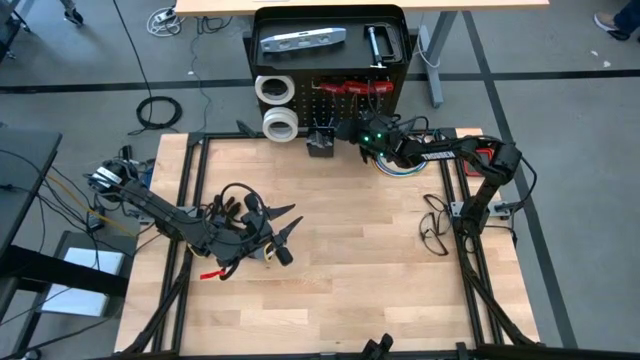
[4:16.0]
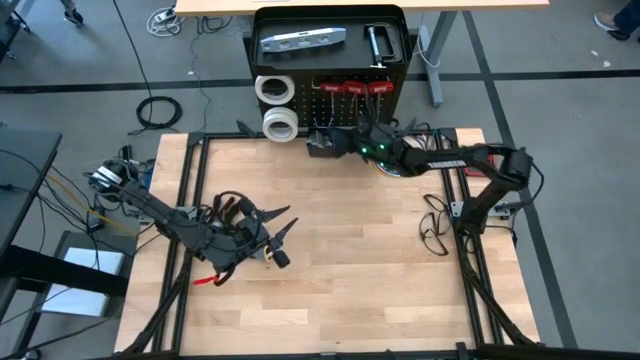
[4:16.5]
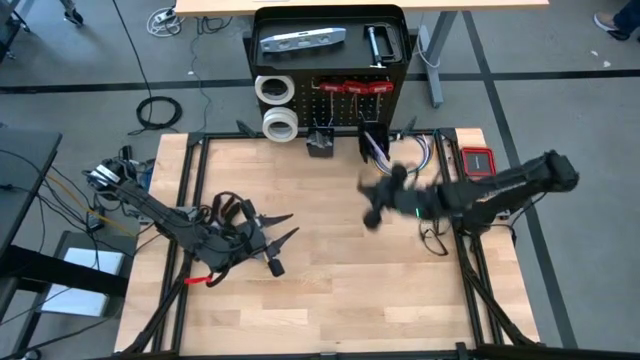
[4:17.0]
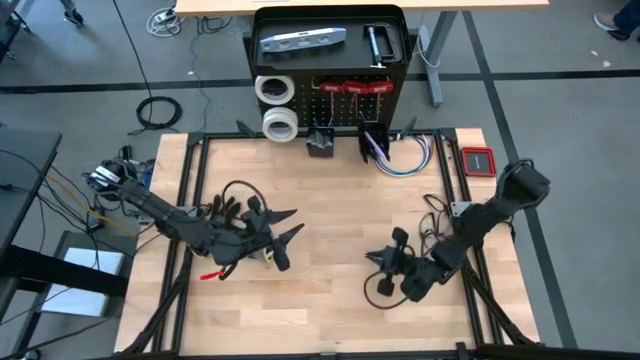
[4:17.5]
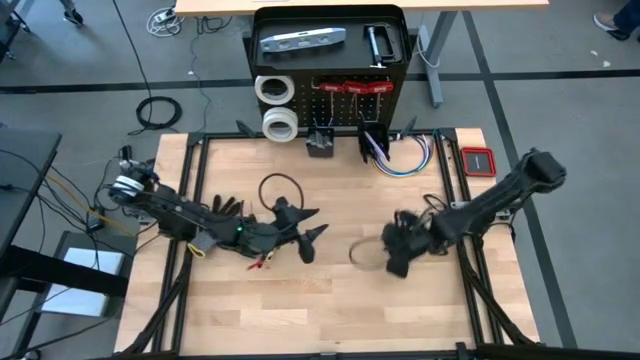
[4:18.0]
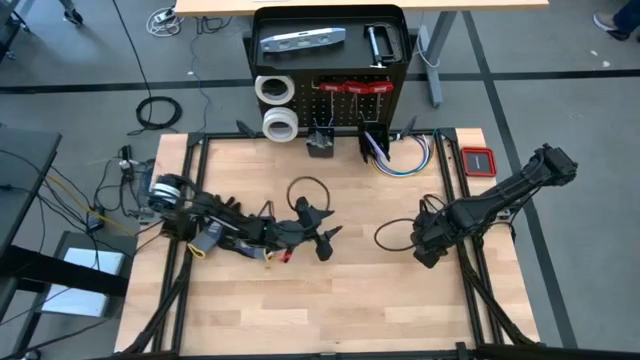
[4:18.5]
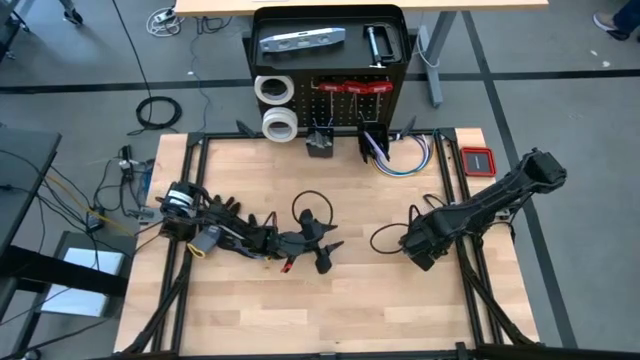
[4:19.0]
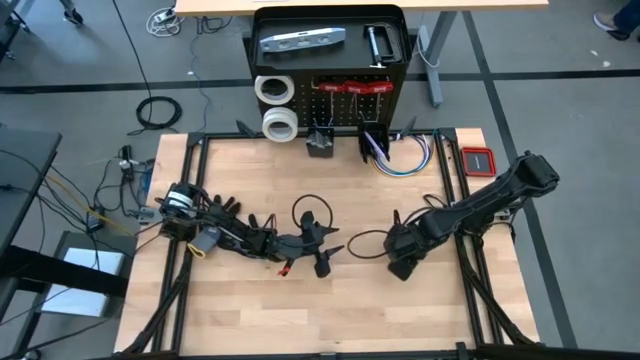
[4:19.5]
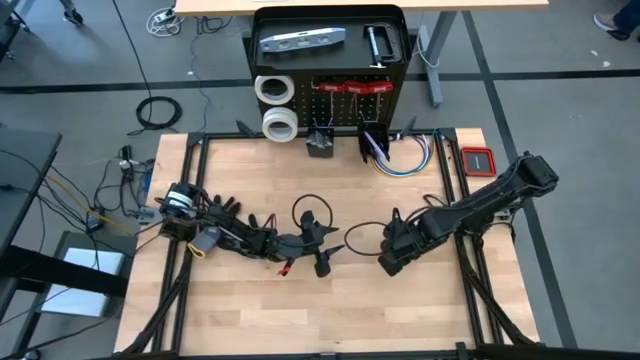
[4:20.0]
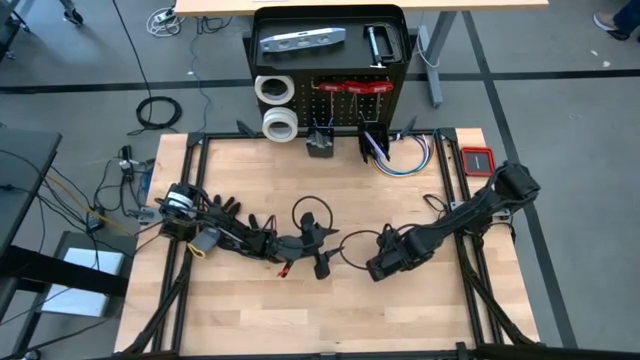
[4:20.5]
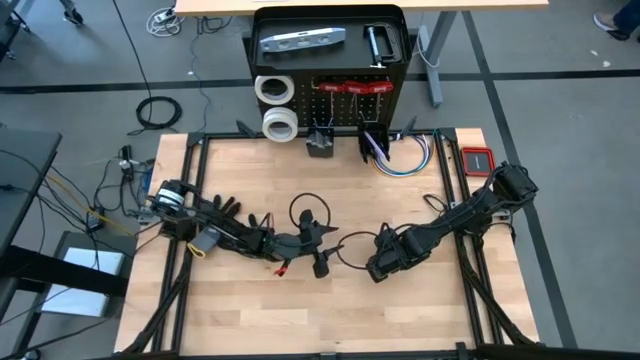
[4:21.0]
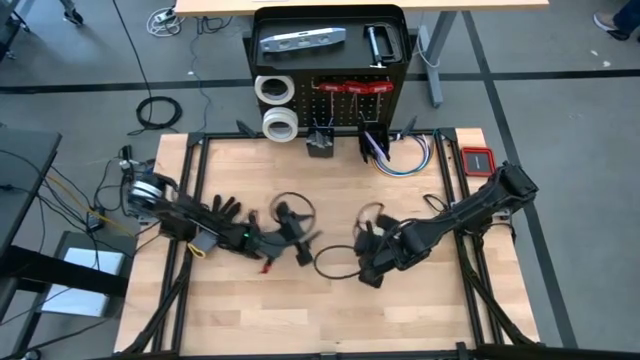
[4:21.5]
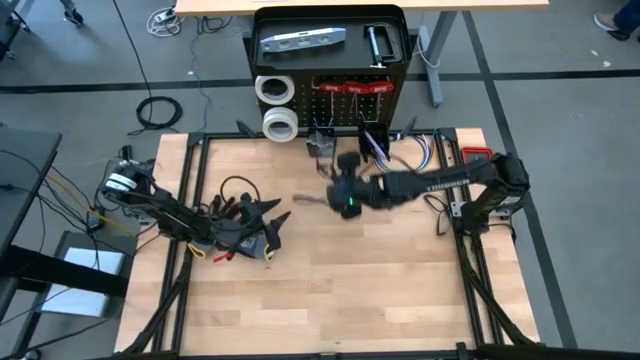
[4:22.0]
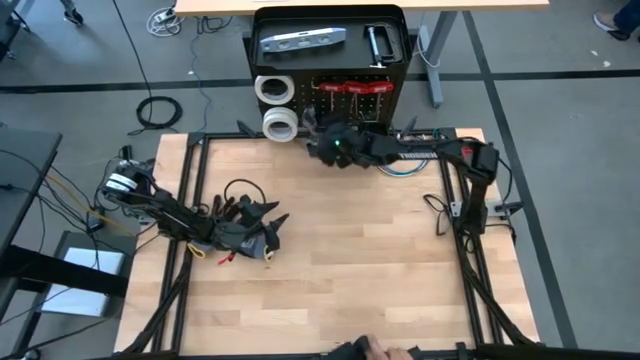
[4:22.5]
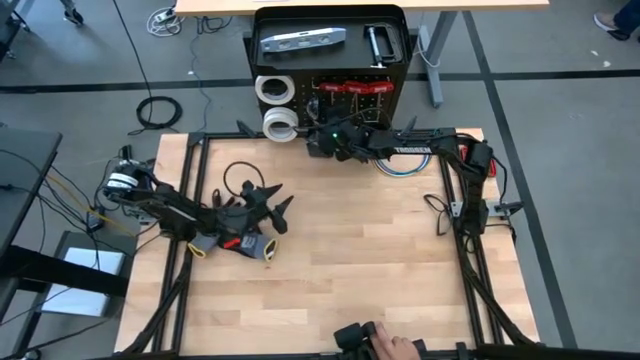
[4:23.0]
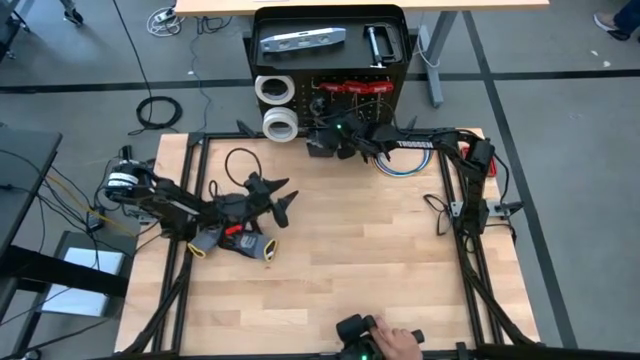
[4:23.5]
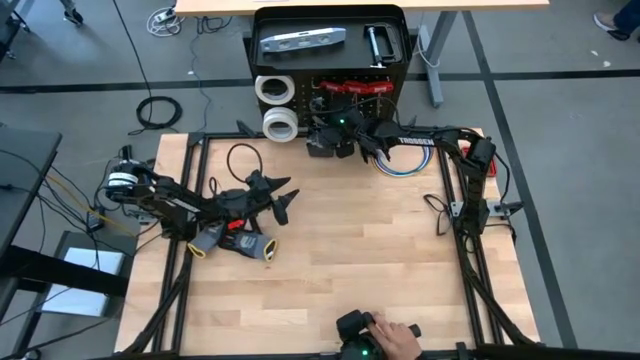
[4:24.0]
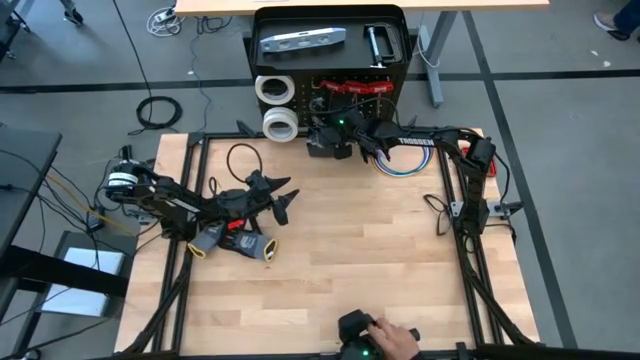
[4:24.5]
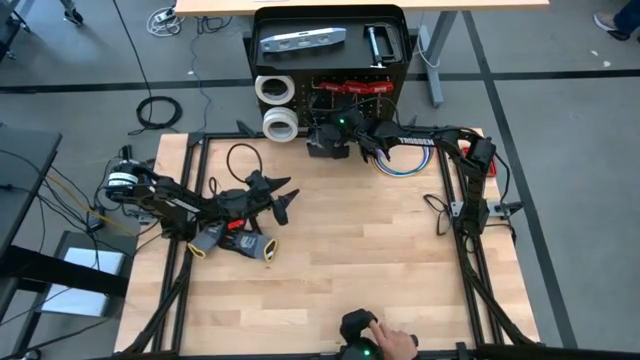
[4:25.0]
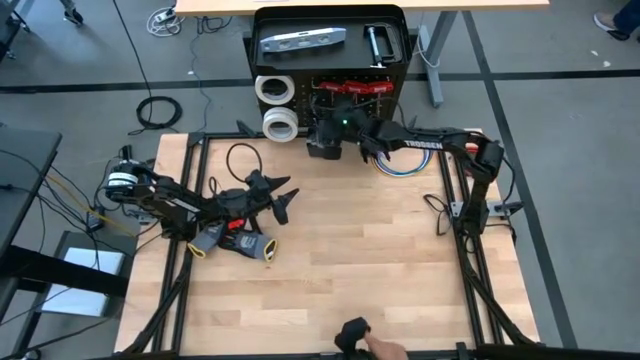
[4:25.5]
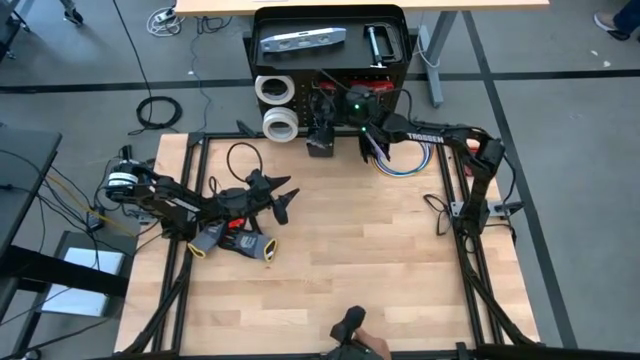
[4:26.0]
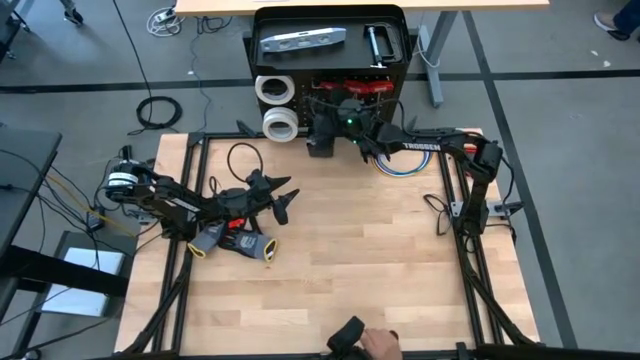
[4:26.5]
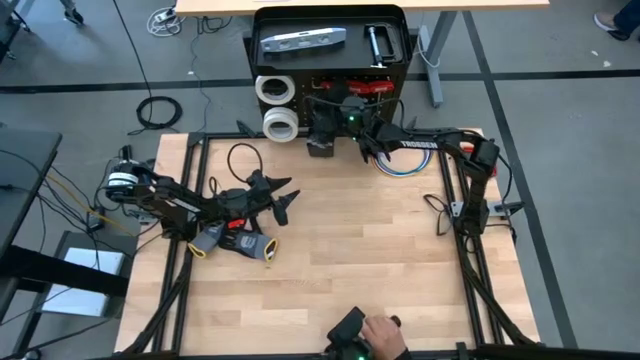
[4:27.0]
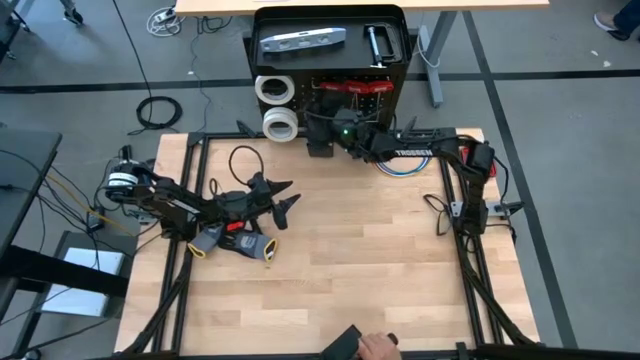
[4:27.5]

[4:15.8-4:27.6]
Task: Hang tools onto peg board
Hang the safety goggles on the peg board

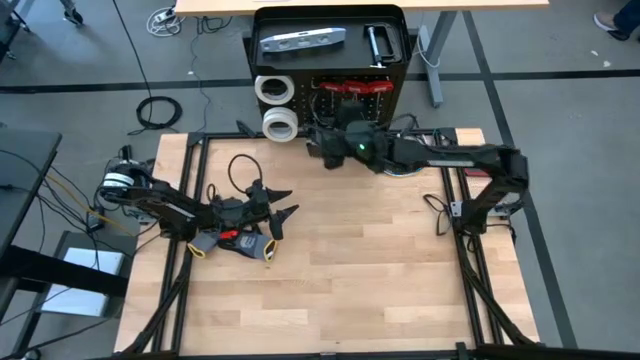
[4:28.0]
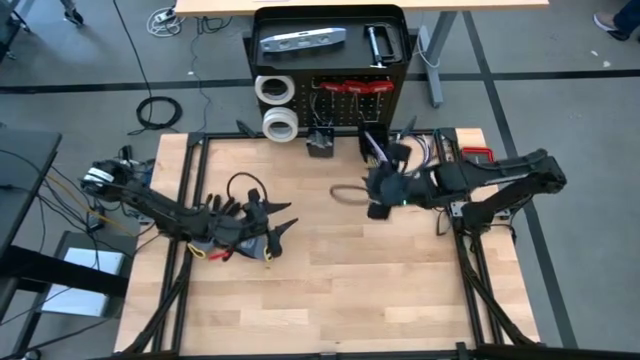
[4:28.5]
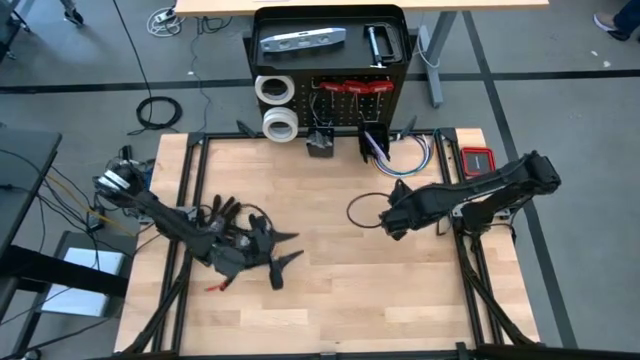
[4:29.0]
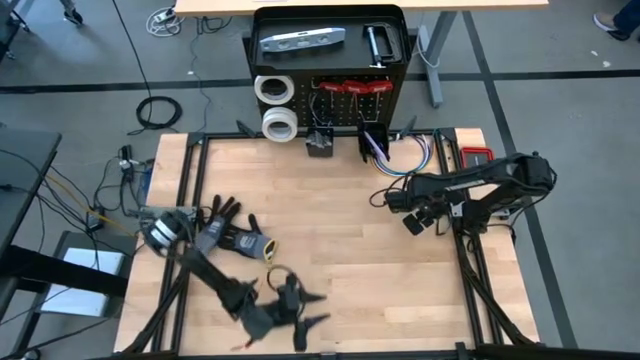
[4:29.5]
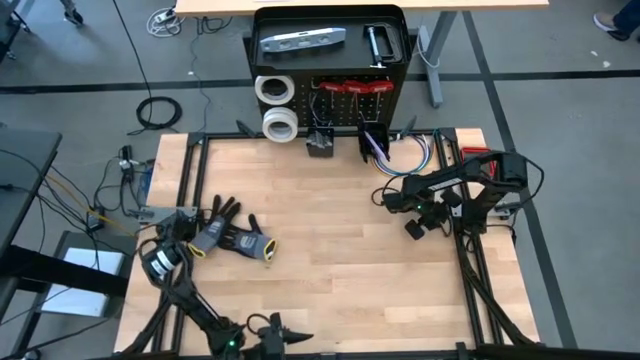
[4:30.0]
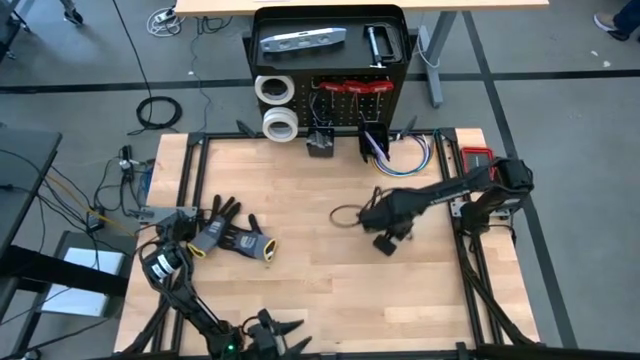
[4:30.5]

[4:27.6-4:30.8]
Hang the safety goggles on the peg board

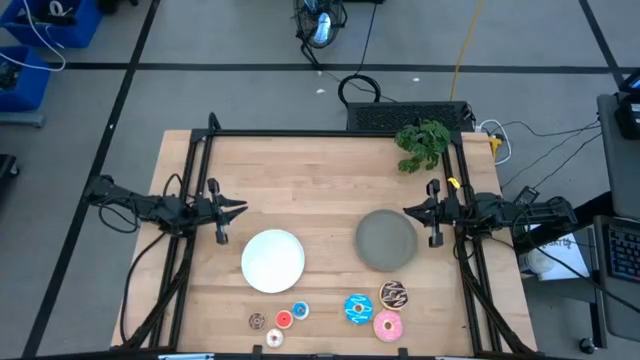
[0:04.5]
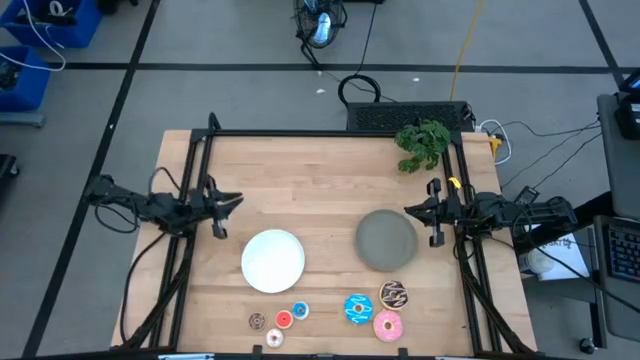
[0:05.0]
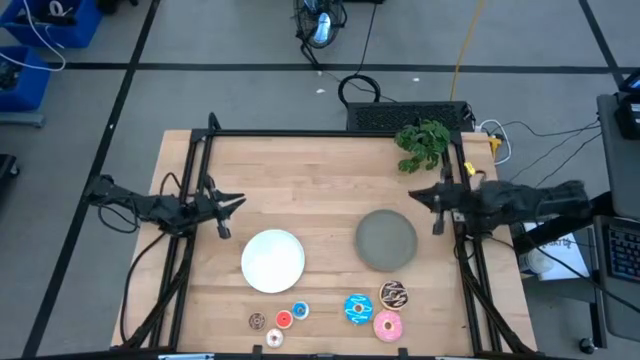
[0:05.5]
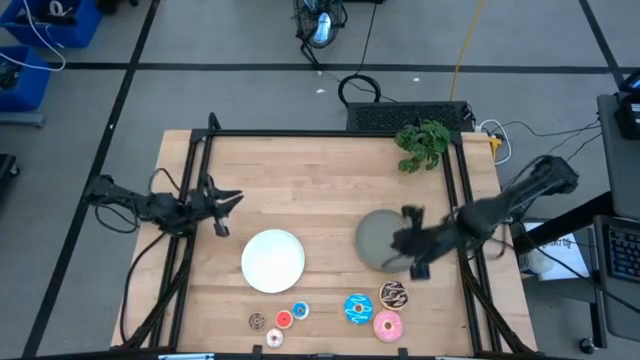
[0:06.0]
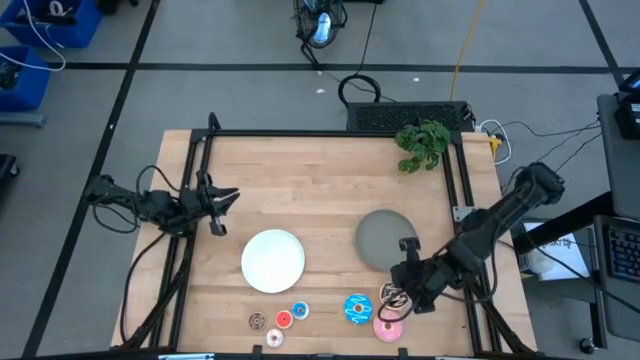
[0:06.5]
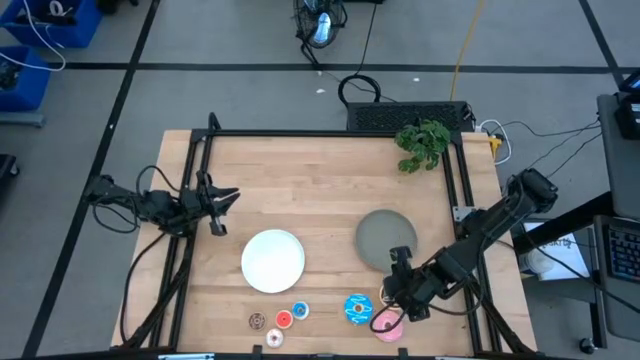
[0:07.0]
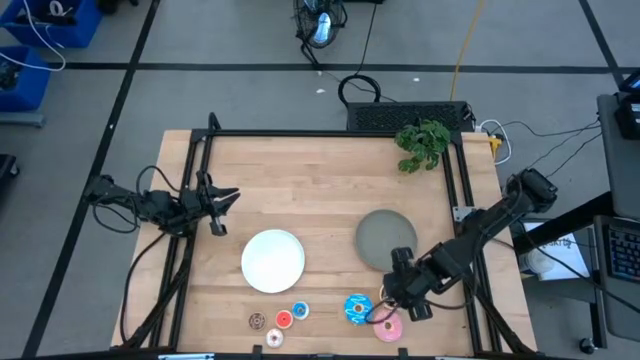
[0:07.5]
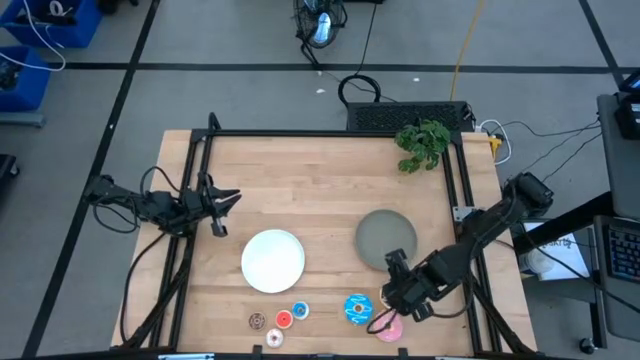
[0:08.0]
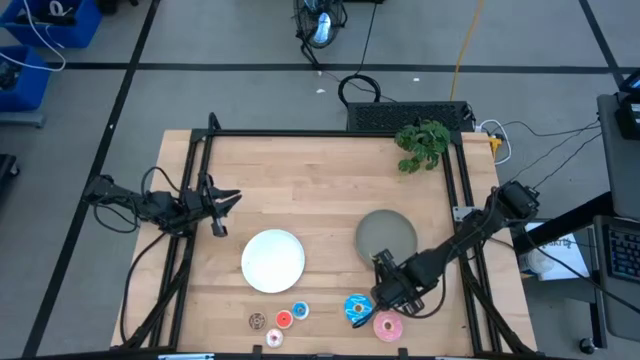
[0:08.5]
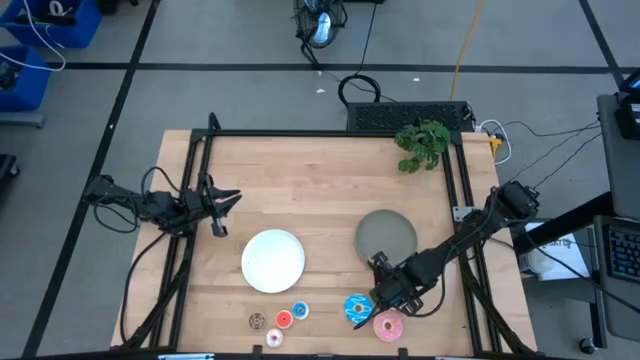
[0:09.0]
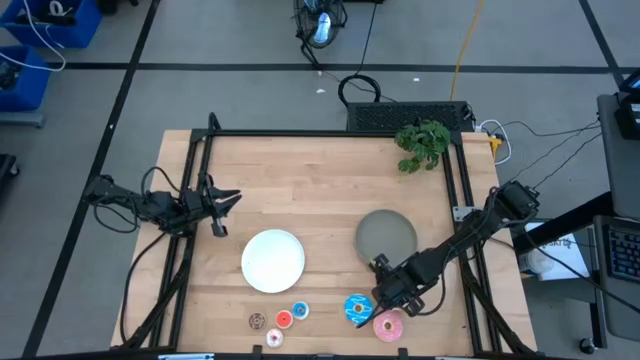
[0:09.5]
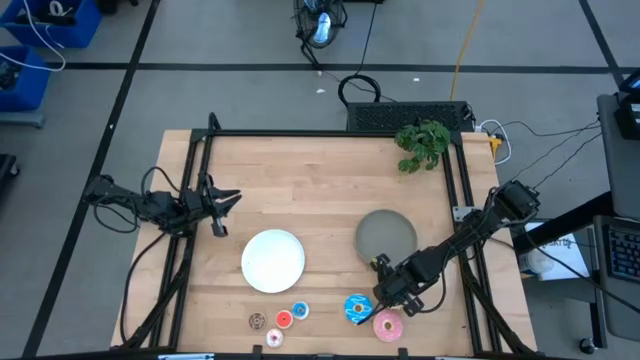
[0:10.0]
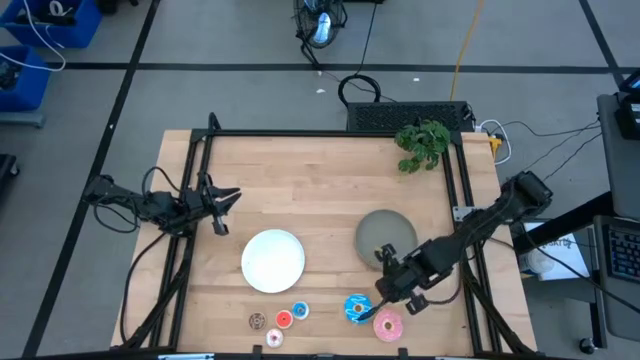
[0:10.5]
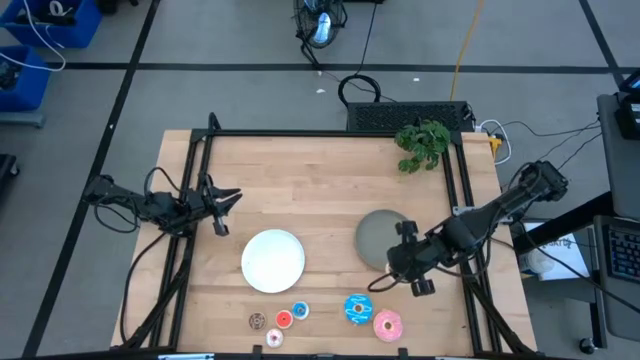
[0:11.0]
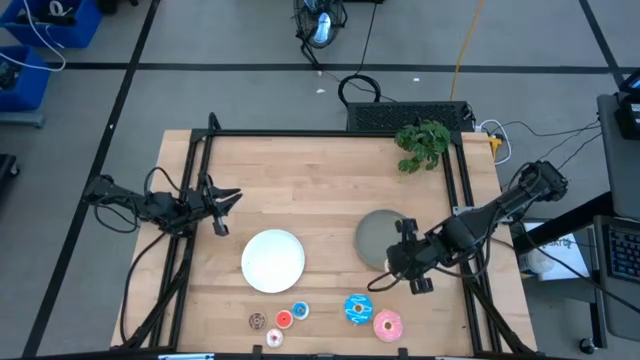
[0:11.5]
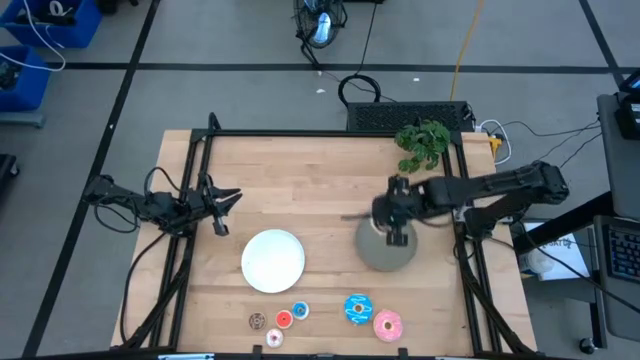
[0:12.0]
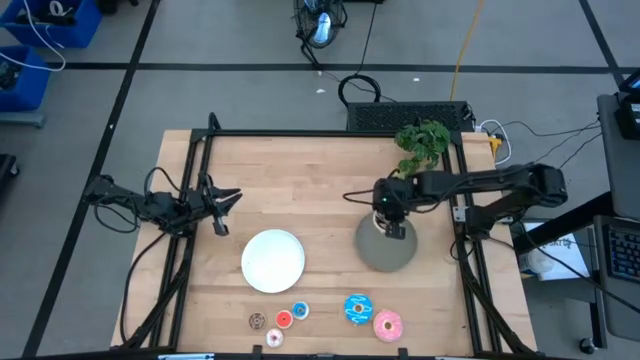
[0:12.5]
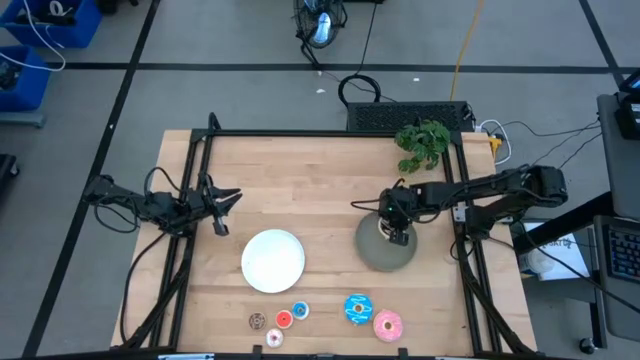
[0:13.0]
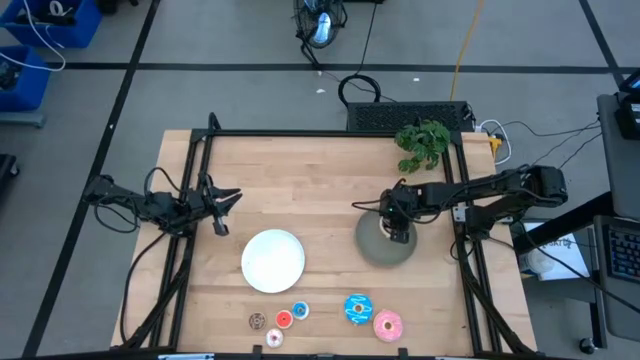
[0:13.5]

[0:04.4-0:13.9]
Task: Pick & Place donuts
Put the black donut on the gray plate
